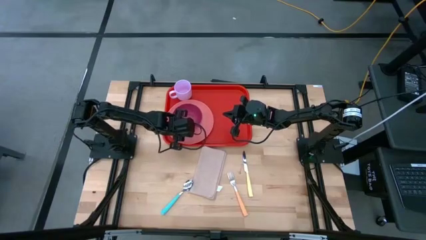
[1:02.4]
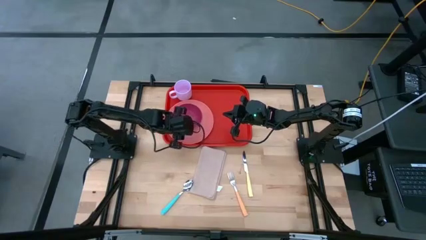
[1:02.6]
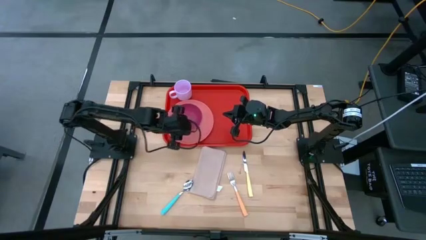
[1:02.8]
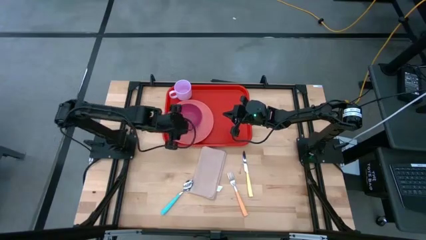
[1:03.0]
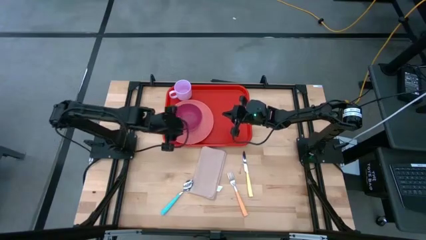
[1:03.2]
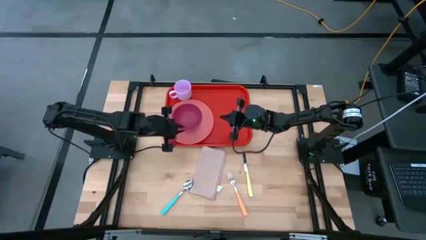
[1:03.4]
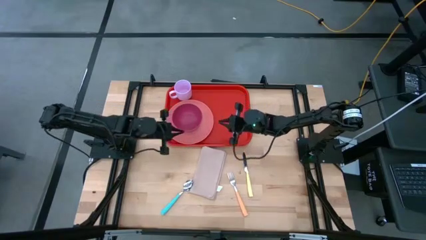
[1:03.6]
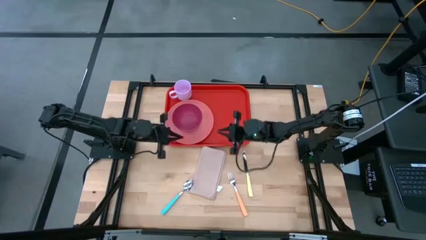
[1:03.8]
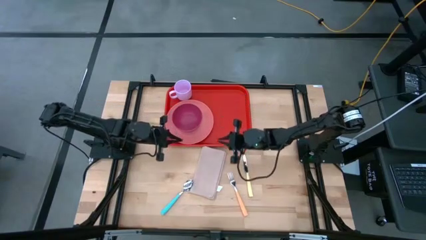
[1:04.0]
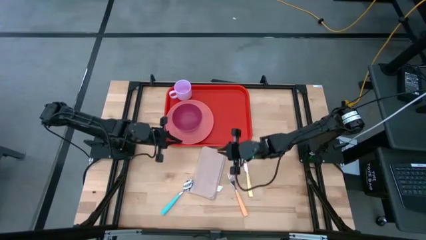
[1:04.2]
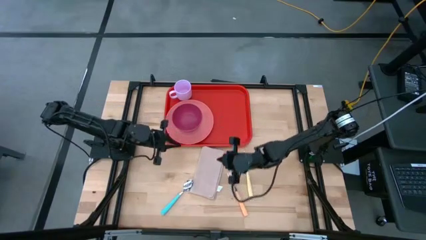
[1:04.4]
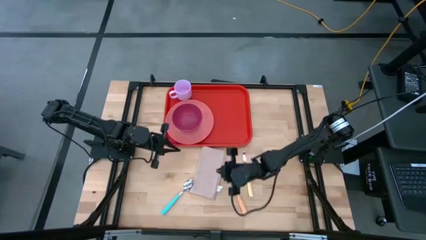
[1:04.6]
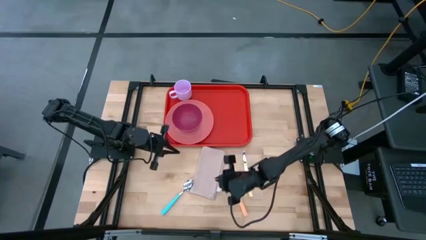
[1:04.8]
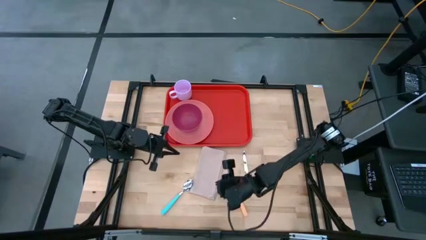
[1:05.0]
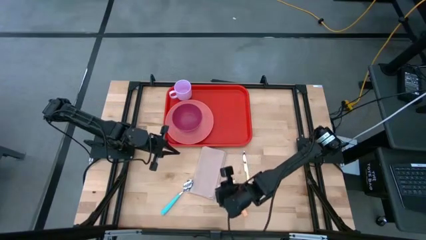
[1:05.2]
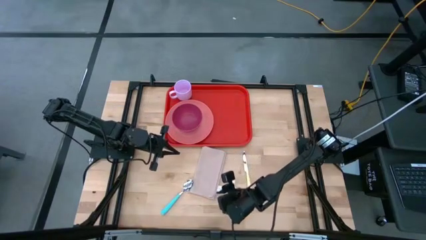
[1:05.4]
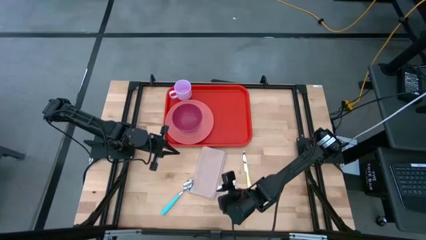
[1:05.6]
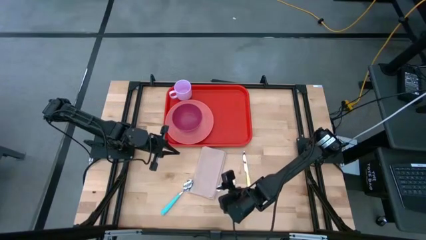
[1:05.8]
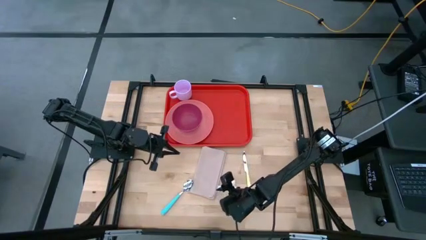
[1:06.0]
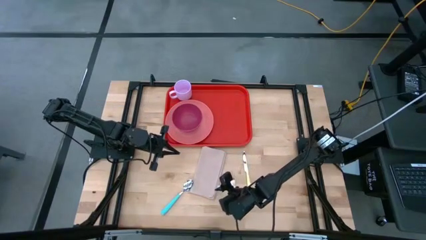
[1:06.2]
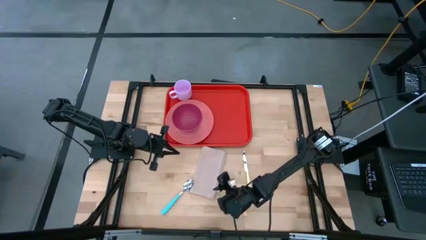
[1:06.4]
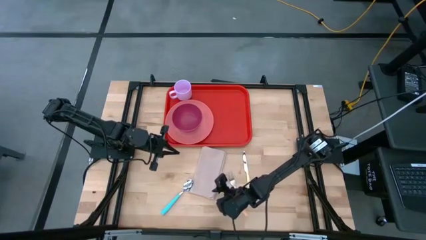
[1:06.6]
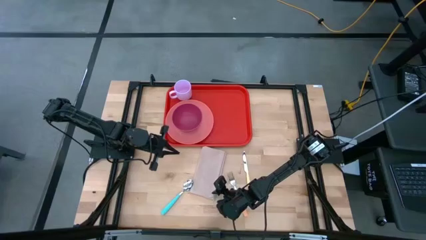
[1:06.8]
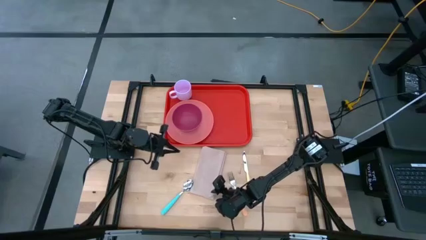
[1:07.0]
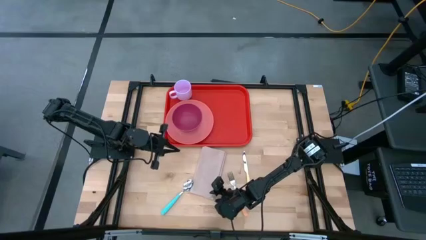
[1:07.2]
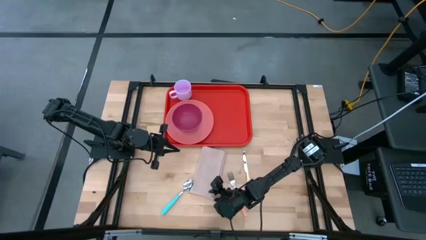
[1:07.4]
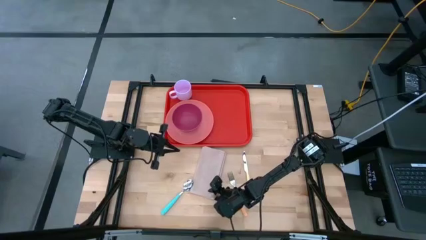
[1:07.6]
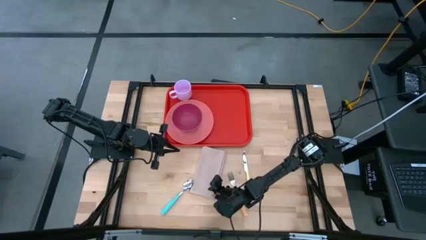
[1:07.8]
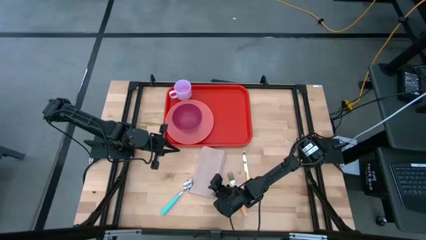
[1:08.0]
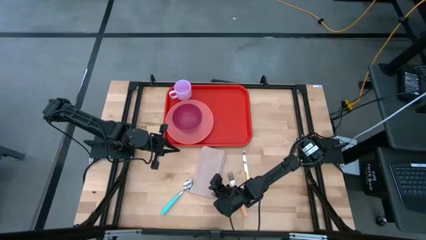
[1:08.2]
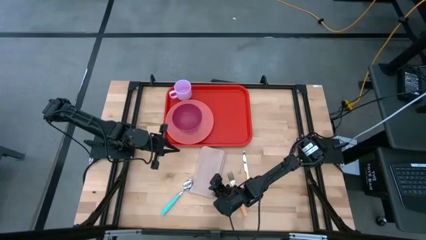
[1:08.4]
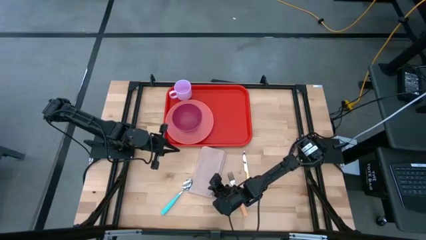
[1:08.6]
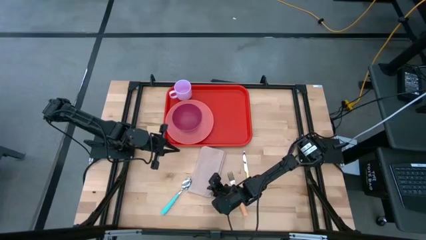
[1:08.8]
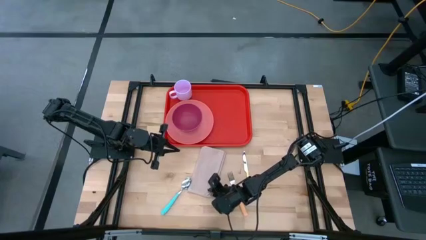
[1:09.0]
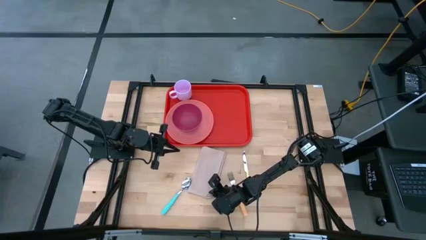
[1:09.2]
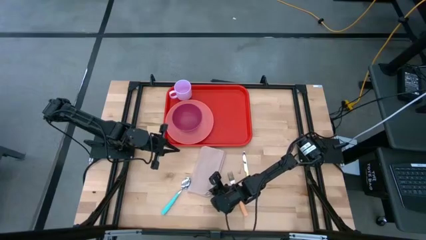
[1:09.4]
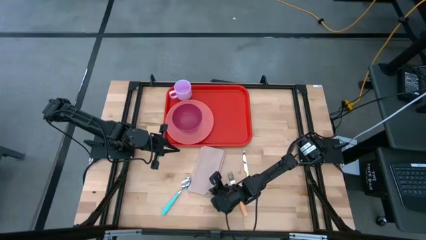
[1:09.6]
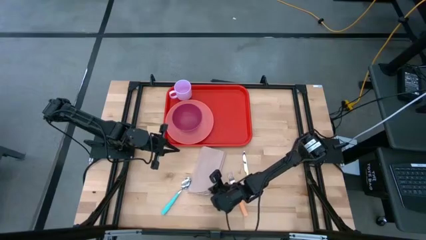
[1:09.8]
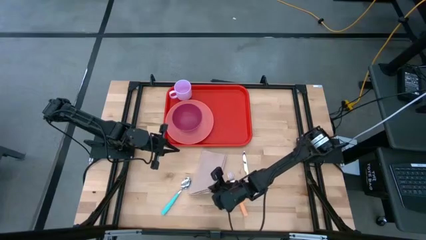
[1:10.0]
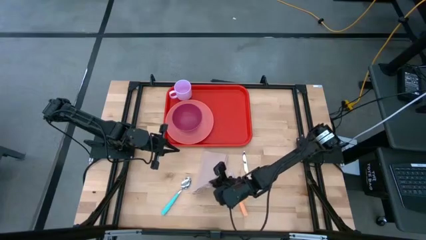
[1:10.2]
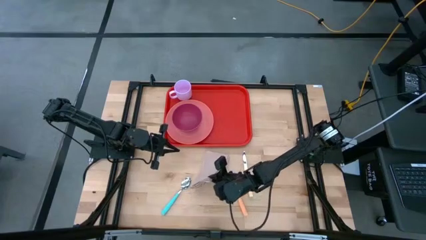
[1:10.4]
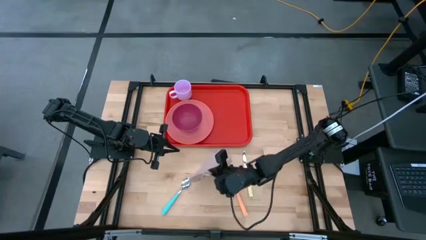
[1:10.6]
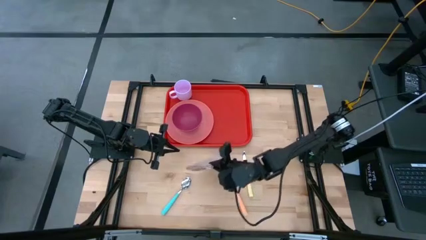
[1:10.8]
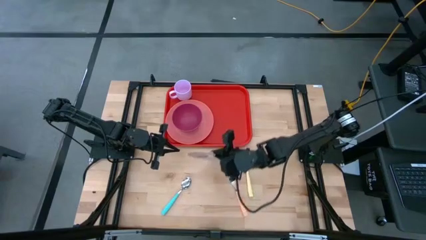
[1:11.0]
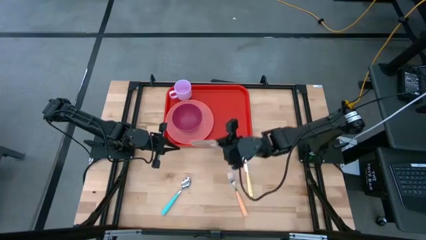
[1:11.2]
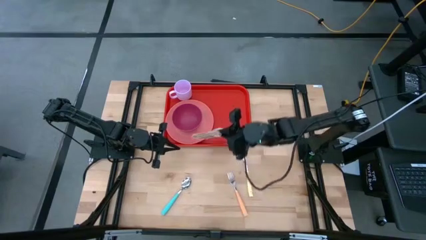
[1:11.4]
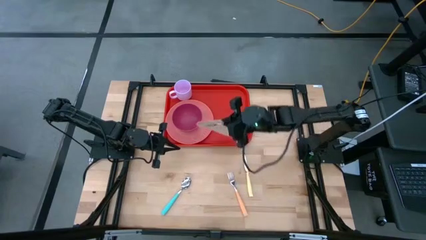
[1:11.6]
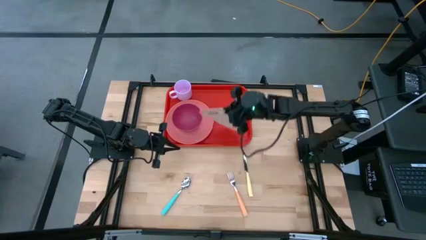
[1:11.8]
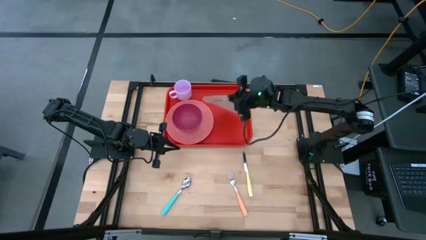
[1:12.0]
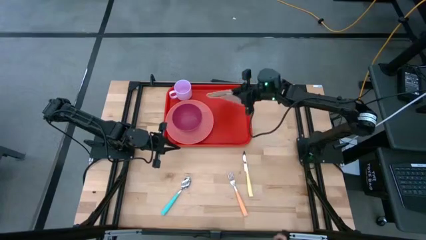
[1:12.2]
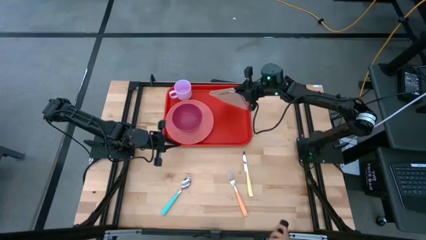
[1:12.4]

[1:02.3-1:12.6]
Task: Set up tray
Put the white table napkin on top of the orange serving tray to the right of the light orange plate

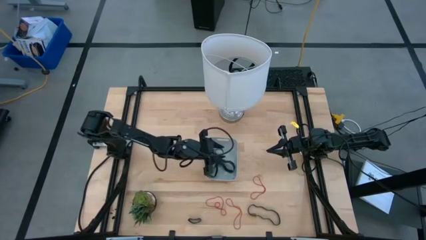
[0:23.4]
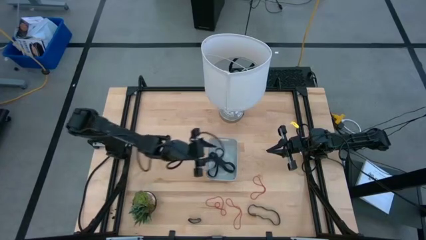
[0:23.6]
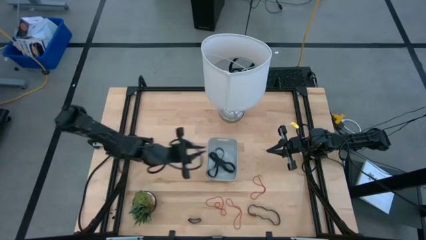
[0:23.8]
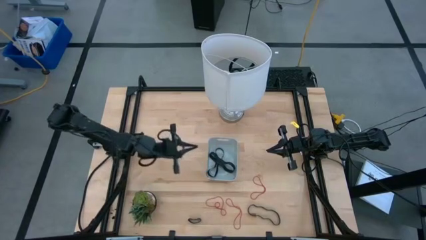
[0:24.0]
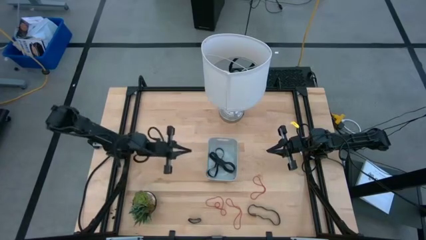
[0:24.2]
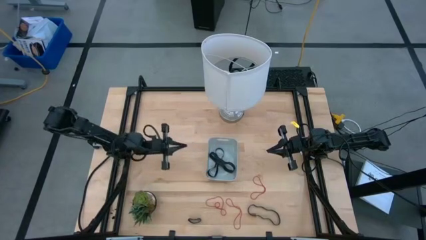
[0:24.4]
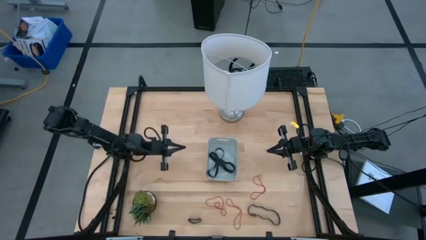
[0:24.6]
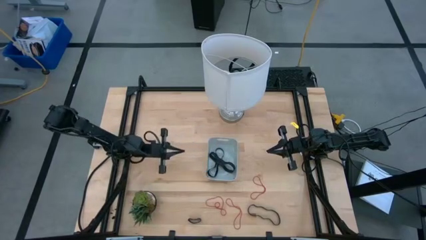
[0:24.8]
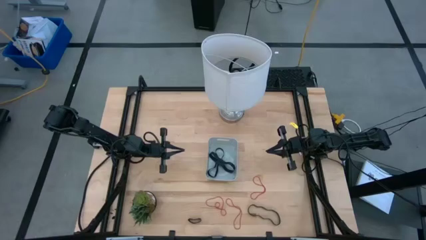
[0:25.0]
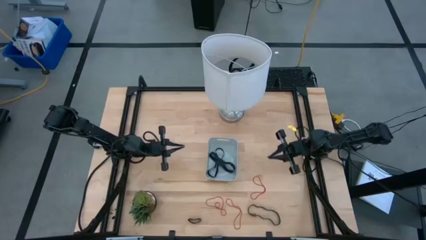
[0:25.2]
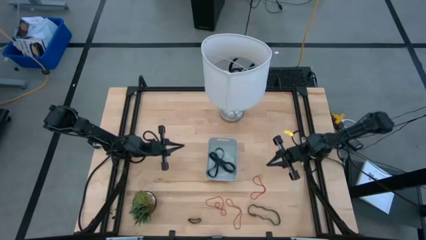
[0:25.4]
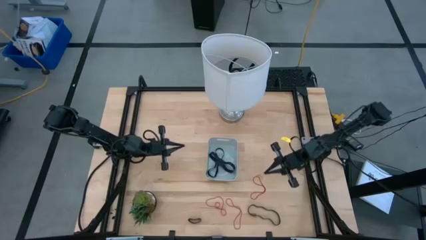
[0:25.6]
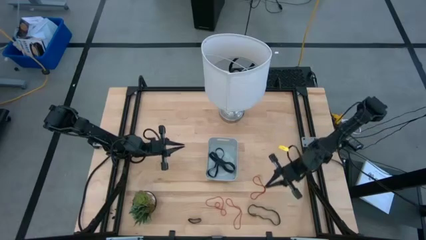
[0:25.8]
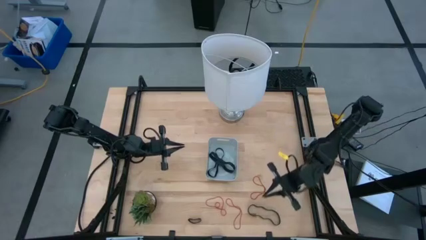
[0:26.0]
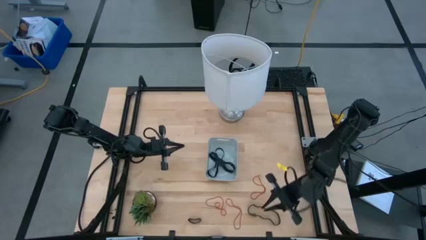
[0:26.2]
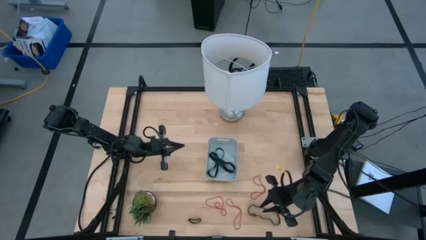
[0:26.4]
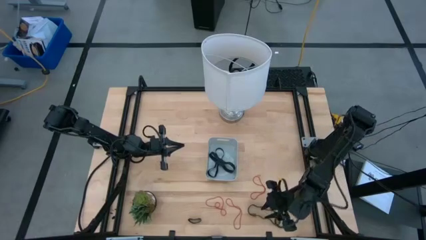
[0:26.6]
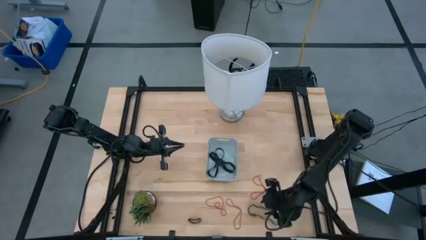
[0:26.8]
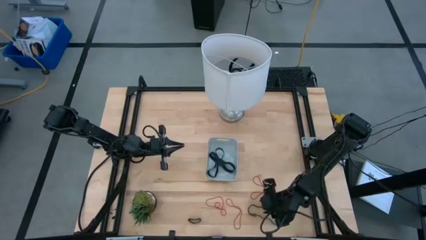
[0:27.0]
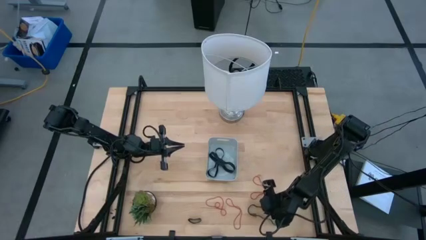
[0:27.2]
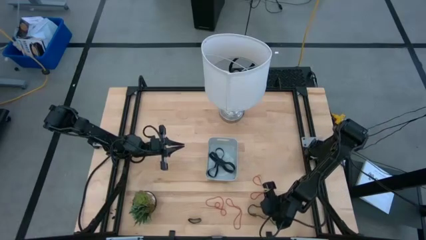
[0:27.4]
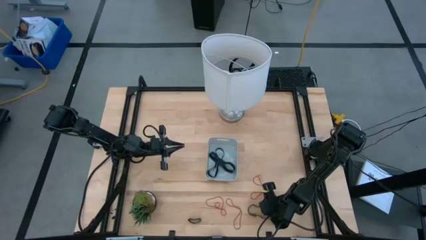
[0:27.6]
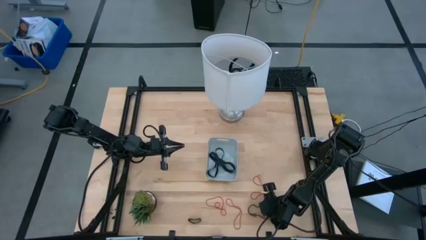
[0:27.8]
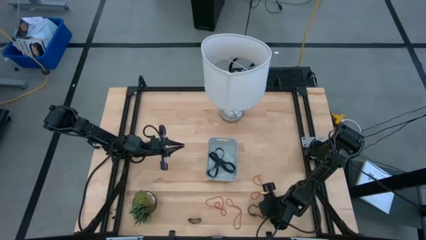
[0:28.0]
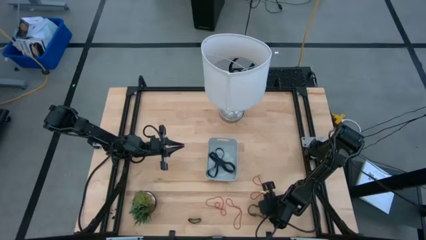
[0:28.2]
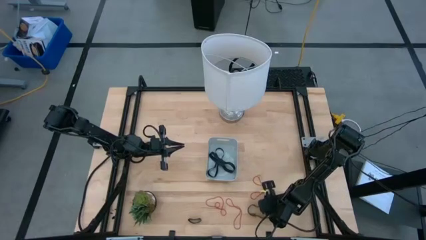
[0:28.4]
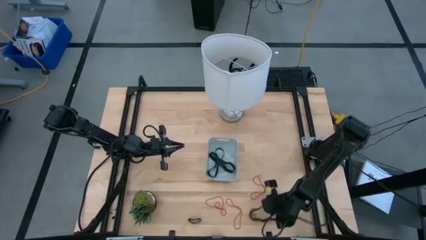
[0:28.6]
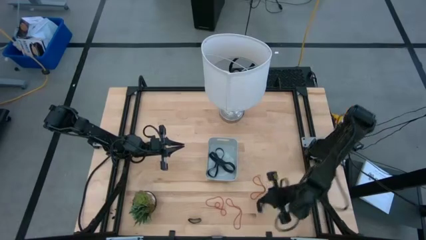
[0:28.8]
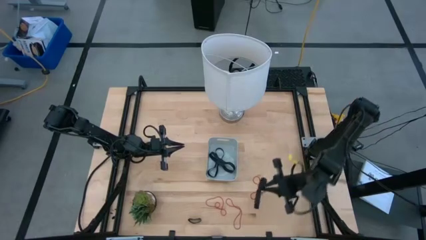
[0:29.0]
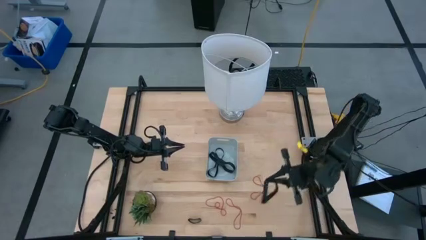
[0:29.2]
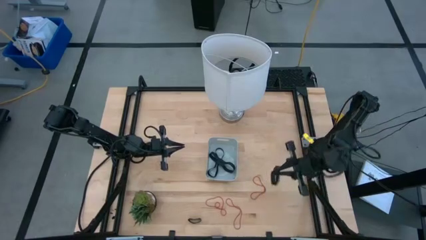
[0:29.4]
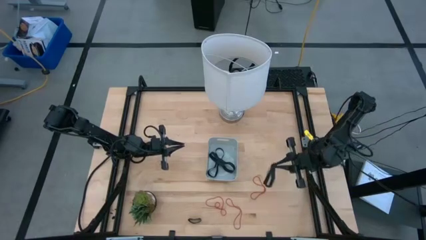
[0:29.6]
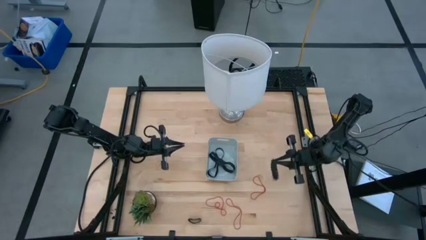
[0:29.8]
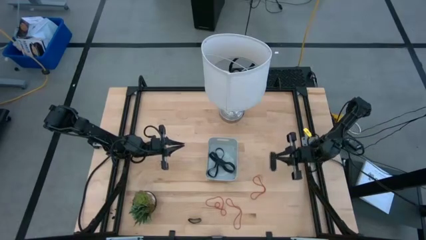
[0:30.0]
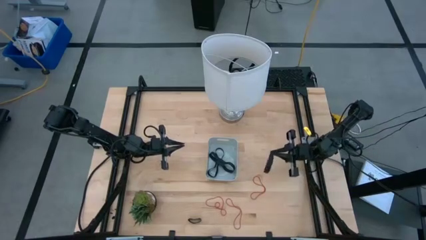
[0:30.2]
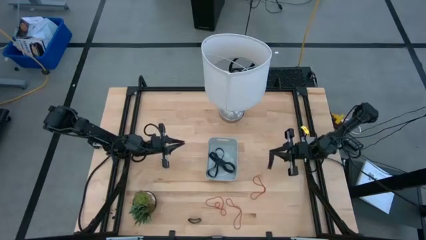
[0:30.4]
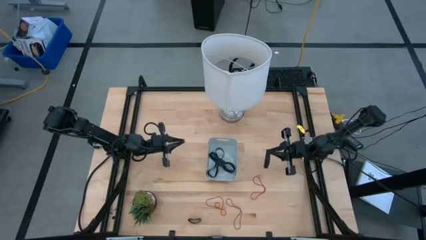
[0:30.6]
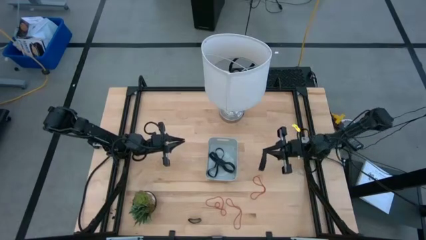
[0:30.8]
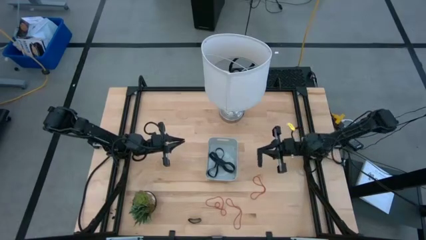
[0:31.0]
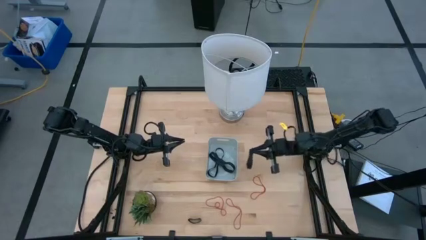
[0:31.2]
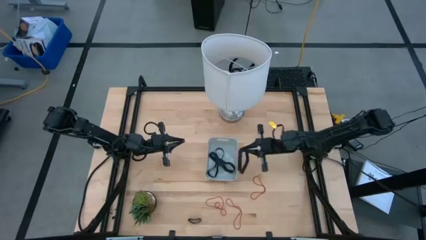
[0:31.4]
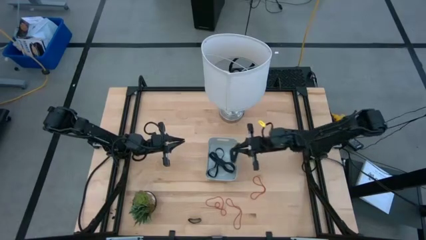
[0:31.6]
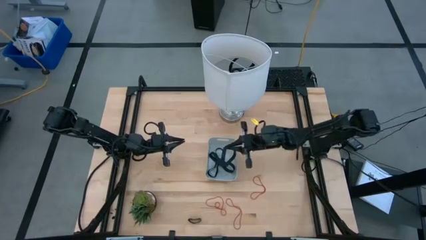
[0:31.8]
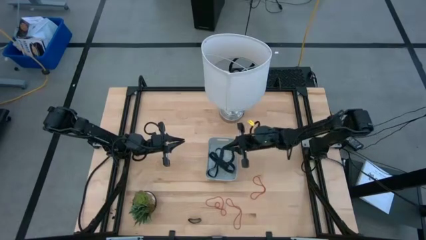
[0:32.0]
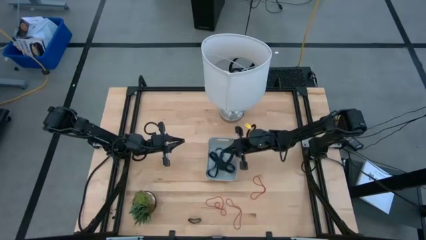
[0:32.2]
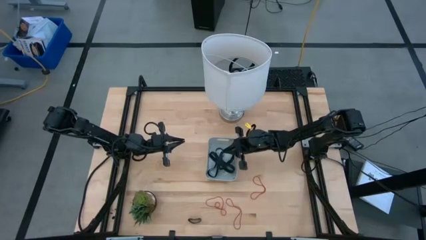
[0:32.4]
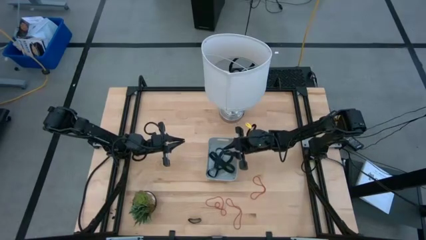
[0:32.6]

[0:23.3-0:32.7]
Task: Pick and place rubber bands into bin
Put the black rubber band into the gray bin
